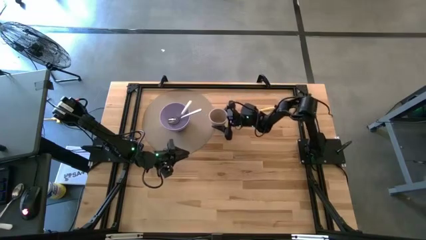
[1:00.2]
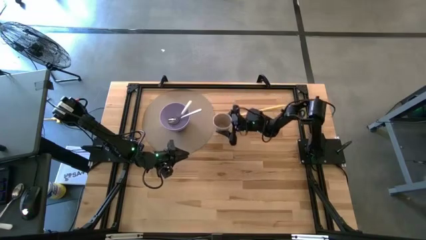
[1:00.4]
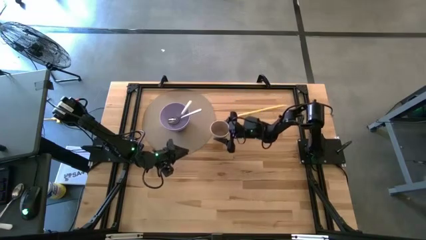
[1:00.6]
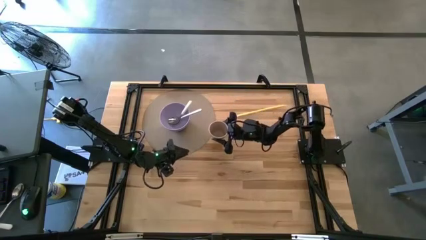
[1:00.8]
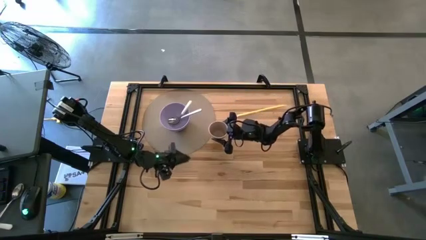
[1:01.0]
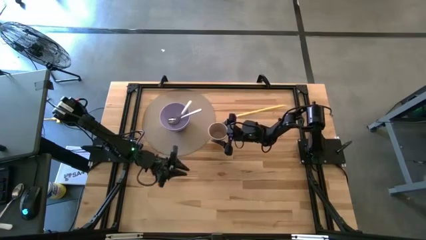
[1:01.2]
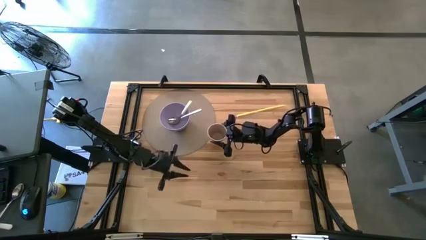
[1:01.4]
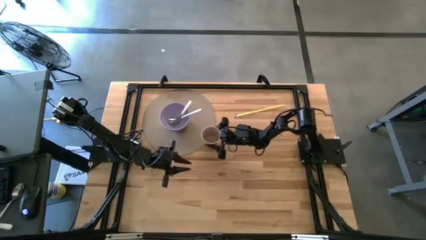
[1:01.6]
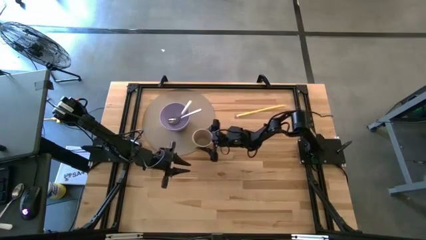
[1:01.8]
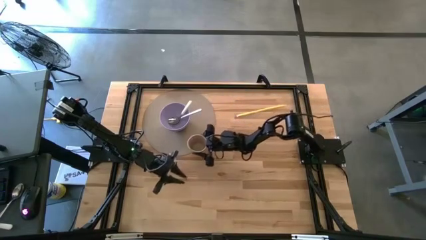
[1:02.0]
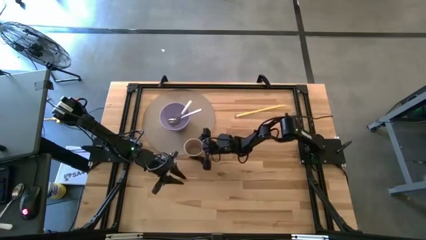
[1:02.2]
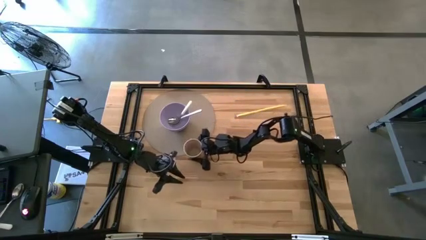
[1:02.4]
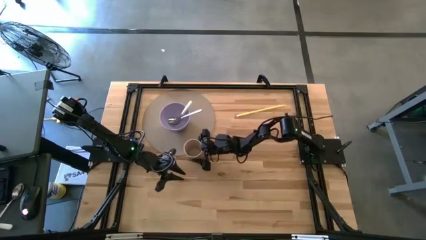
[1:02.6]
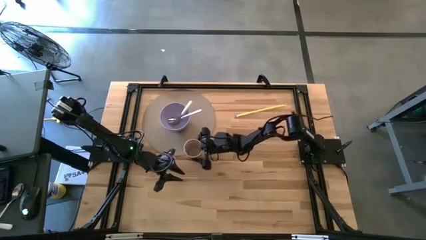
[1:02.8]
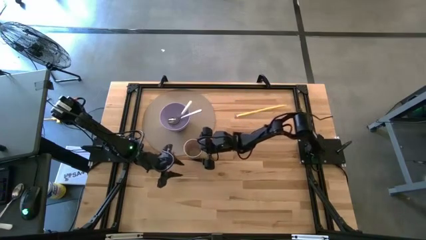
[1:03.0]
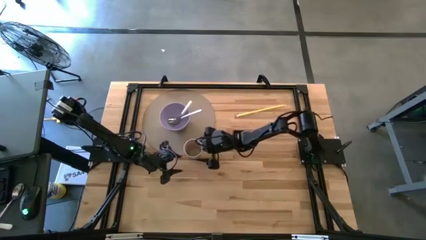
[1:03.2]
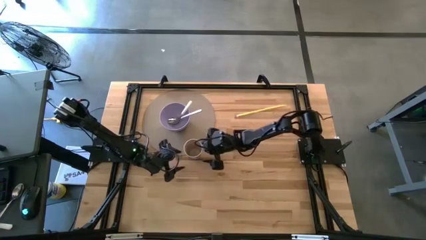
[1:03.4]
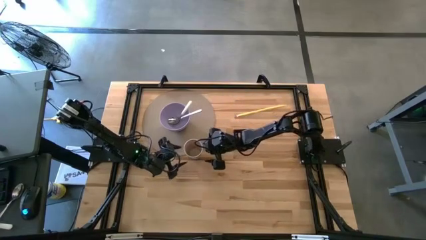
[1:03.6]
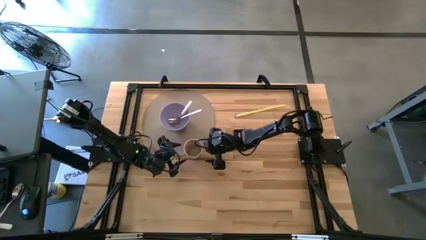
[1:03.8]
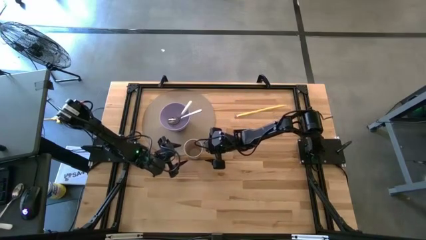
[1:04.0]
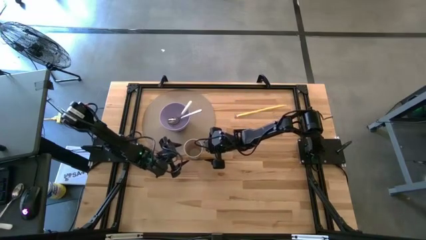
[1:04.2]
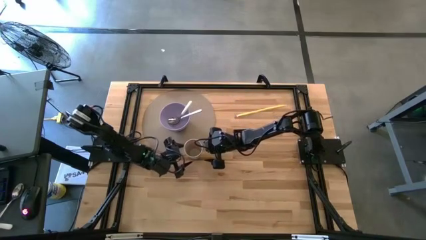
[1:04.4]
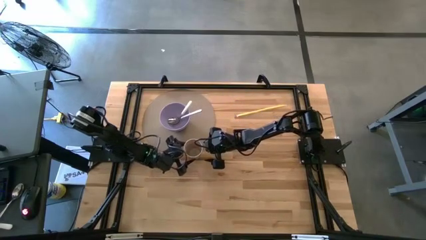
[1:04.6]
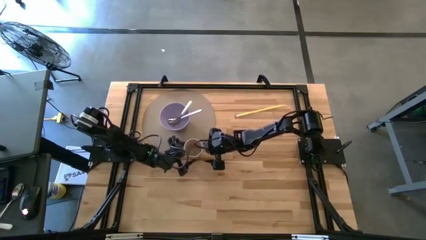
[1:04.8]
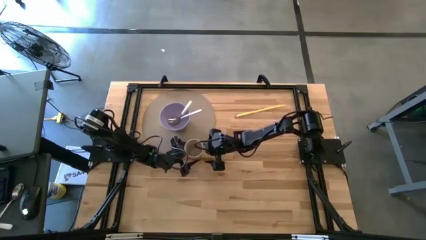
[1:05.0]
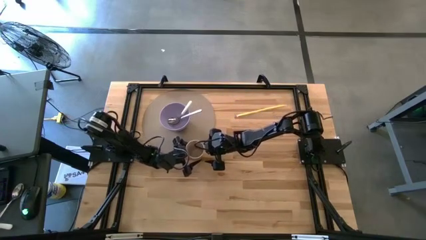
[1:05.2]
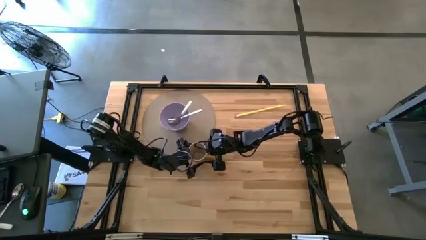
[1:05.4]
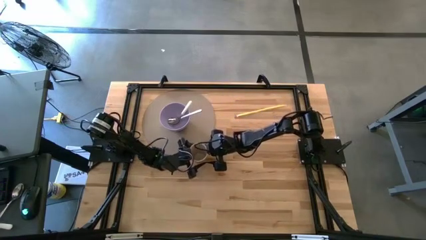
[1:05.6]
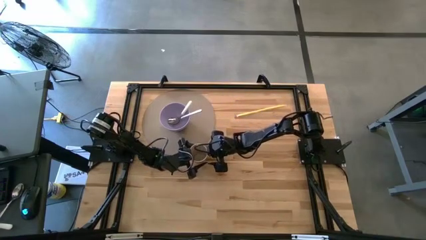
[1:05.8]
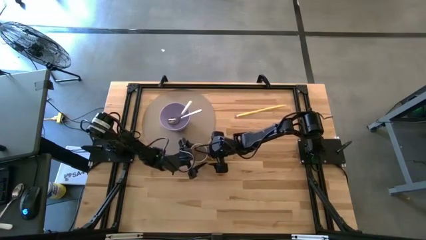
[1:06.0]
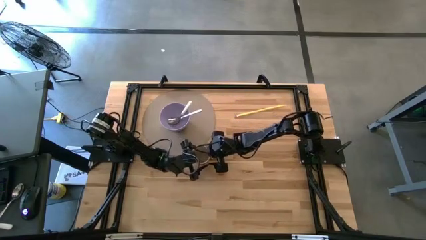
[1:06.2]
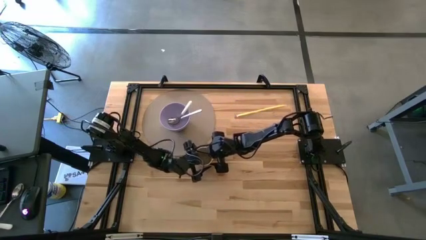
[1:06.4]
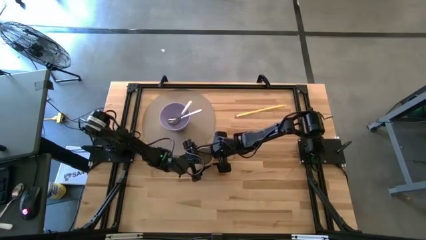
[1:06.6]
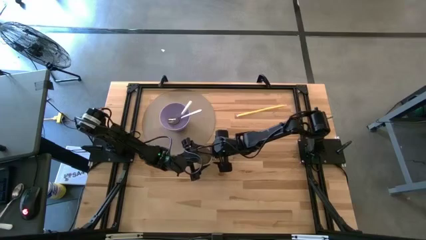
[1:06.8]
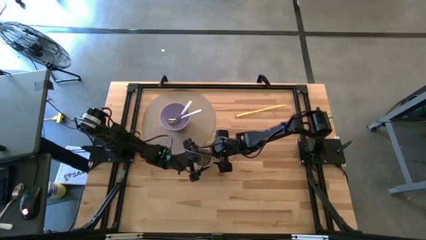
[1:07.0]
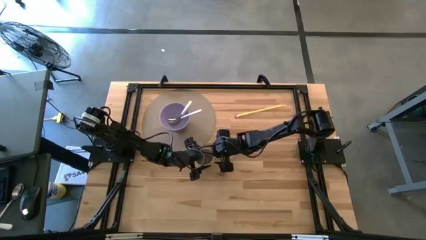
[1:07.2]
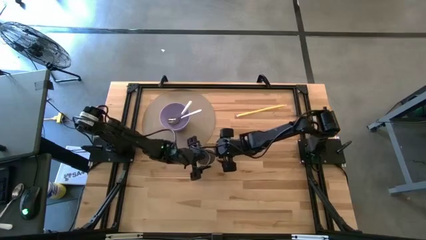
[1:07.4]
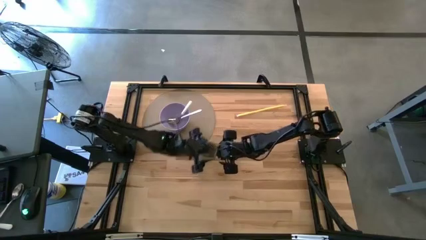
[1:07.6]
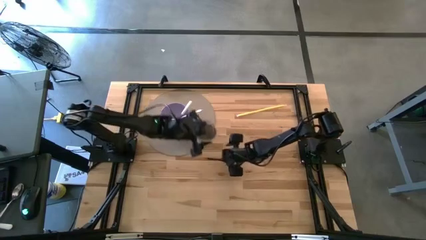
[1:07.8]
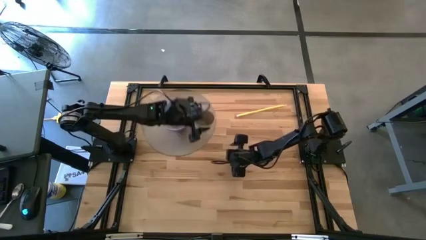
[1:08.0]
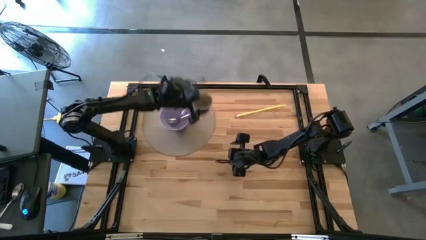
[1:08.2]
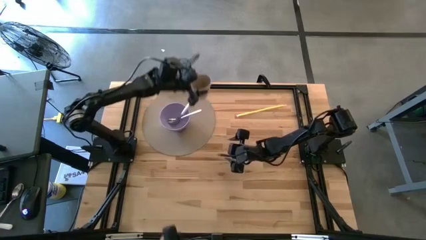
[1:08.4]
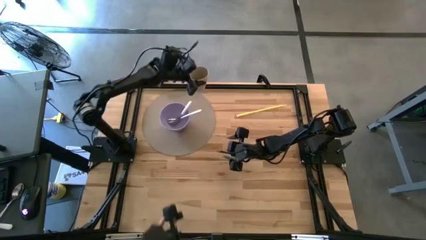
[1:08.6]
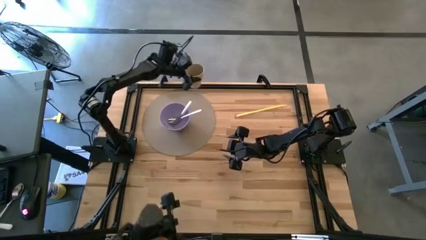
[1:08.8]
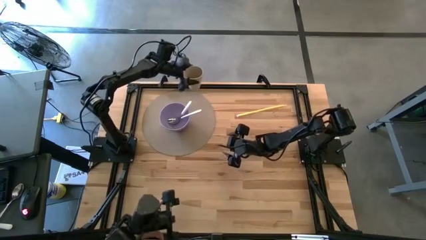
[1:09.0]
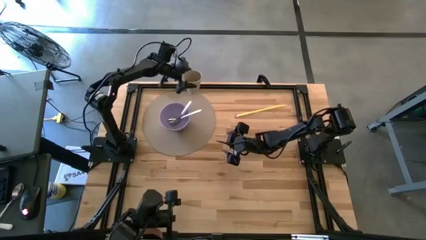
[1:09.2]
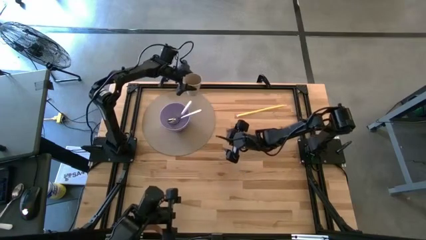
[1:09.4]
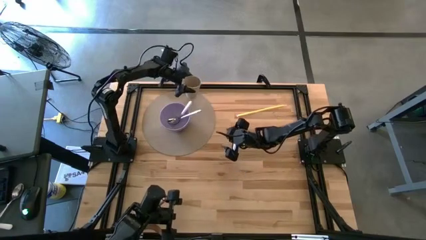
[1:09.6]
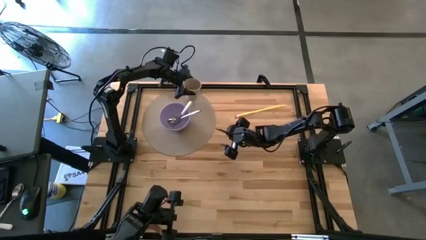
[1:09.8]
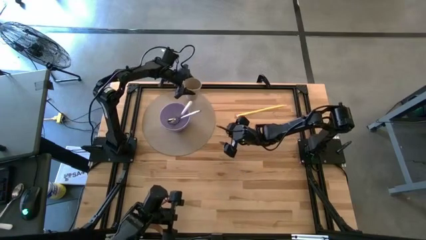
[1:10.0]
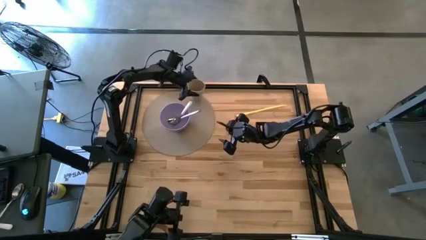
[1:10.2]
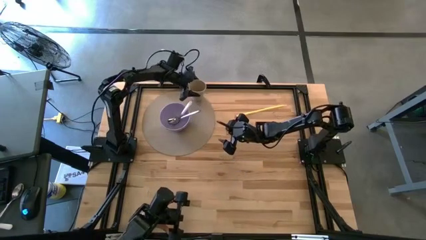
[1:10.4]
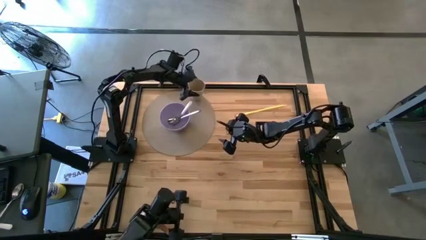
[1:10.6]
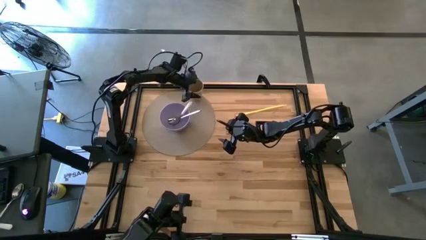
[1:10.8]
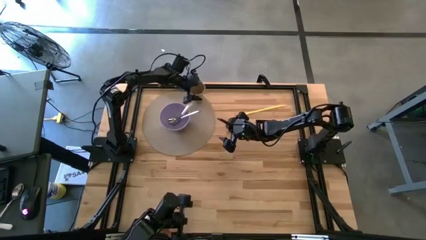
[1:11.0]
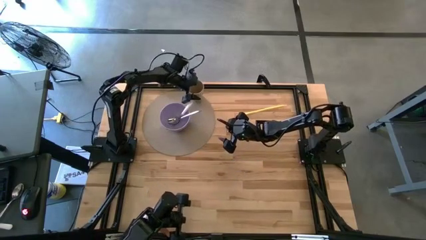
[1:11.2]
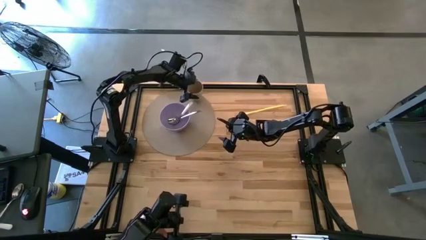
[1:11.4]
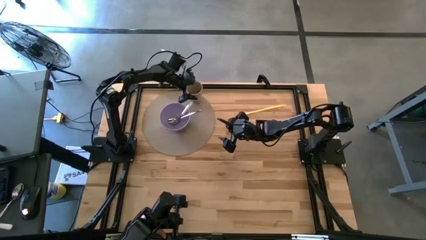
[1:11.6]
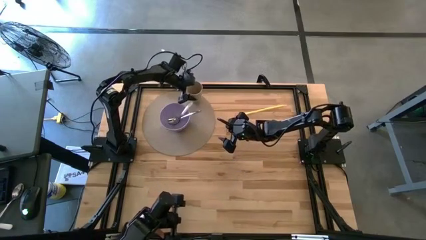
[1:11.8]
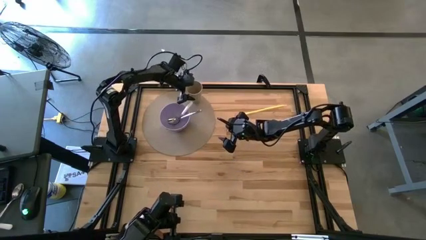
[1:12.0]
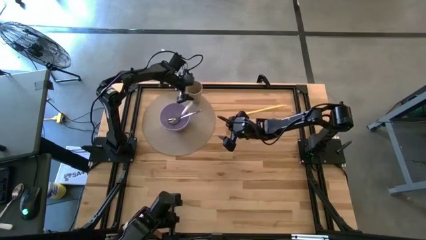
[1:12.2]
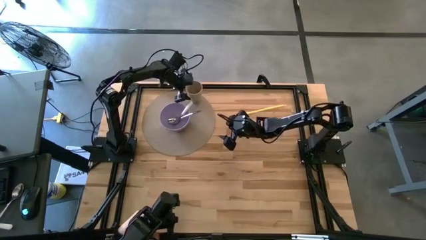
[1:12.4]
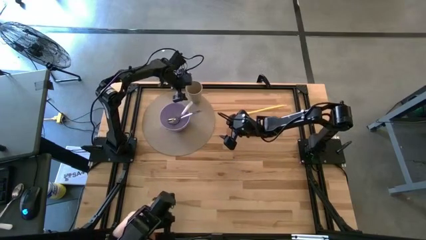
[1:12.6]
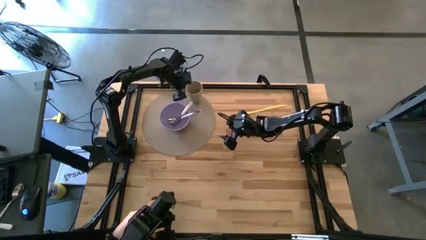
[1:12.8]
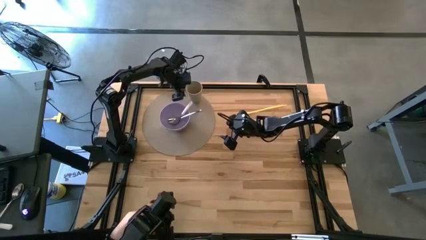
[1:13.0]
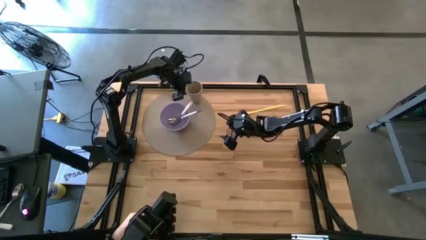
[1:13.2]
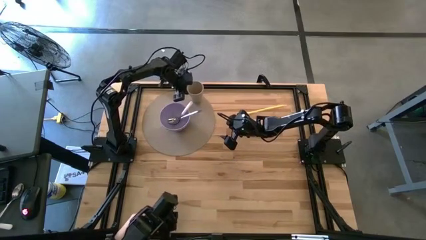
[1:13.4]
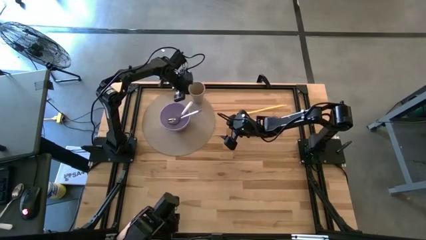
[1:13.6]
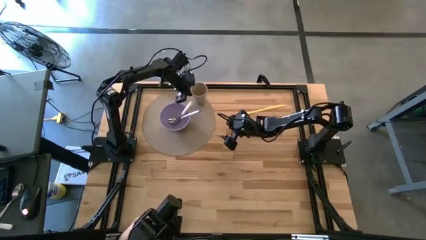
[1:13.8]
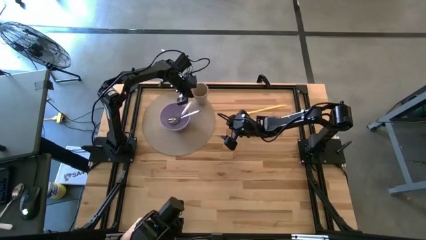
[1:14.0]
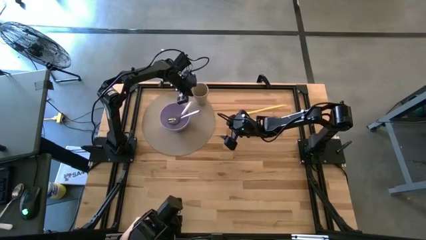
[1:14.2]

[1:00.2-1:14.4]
Task: Pick & Place Utensil
Put the white cup on the brown mat to the top right of the violet bowl

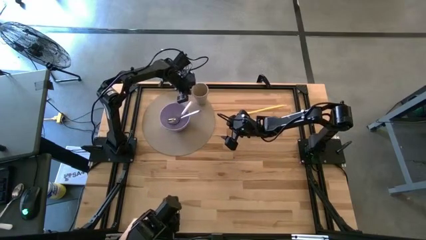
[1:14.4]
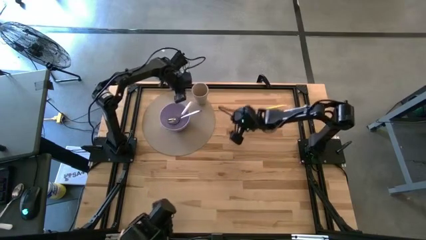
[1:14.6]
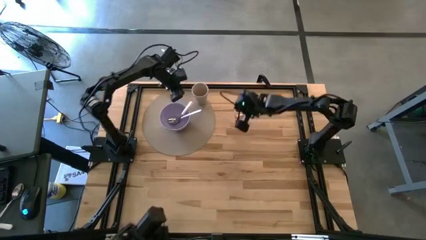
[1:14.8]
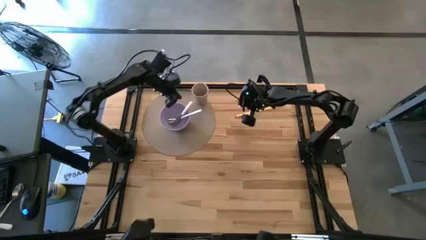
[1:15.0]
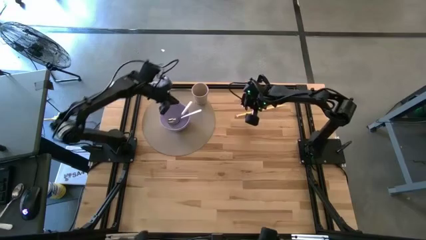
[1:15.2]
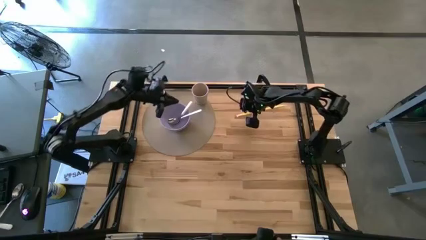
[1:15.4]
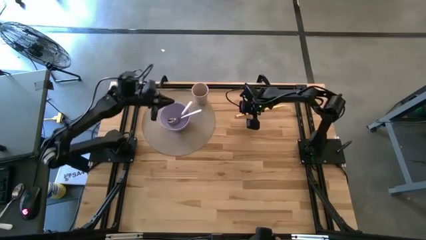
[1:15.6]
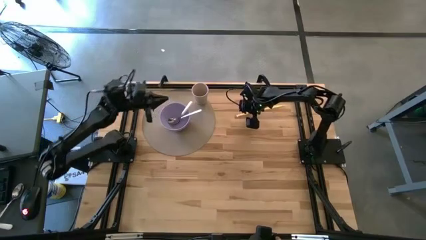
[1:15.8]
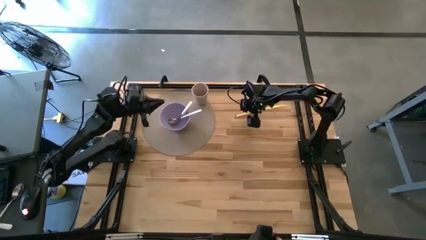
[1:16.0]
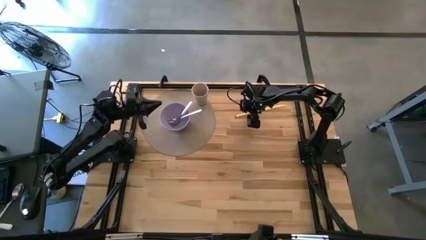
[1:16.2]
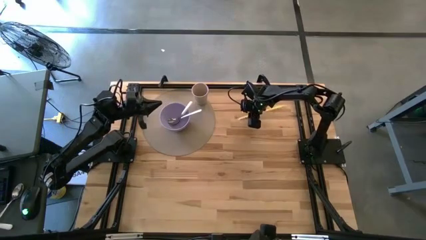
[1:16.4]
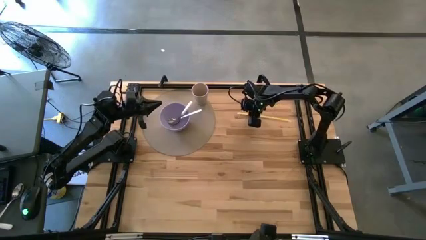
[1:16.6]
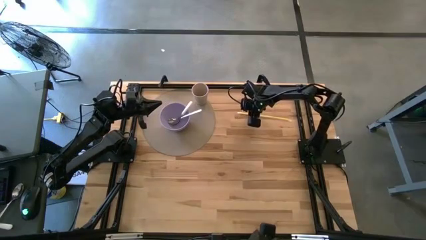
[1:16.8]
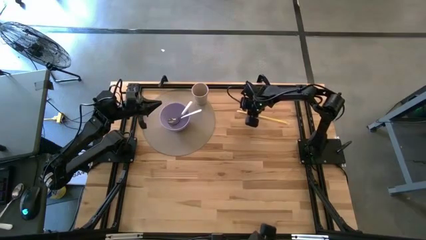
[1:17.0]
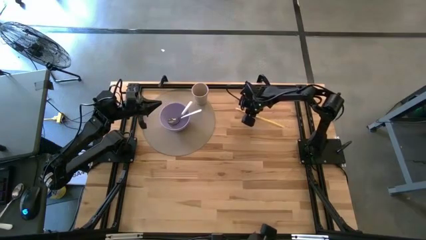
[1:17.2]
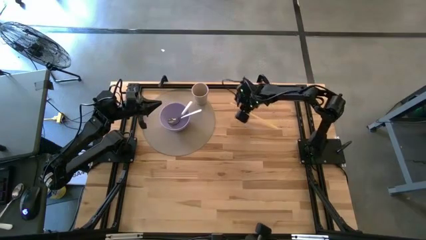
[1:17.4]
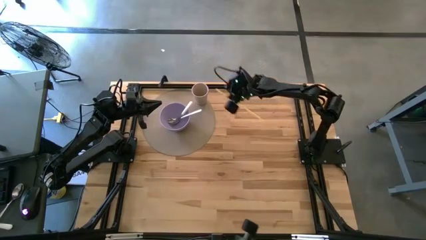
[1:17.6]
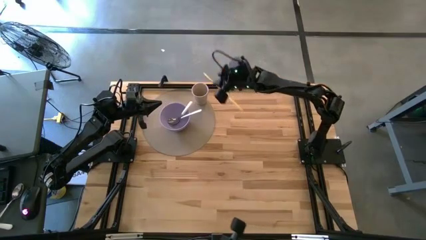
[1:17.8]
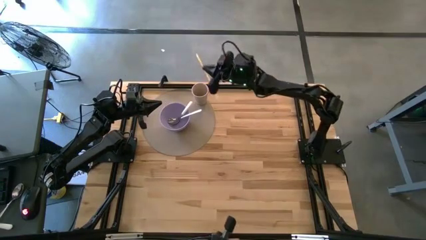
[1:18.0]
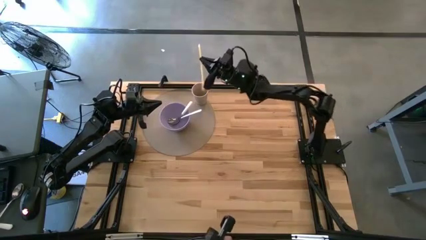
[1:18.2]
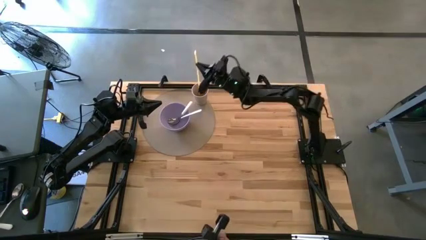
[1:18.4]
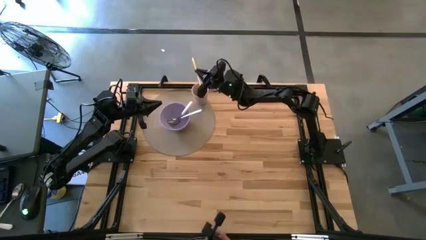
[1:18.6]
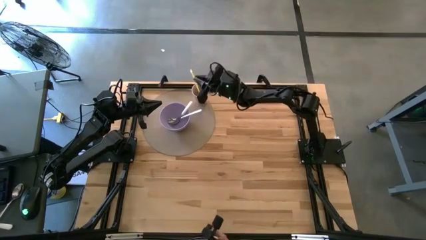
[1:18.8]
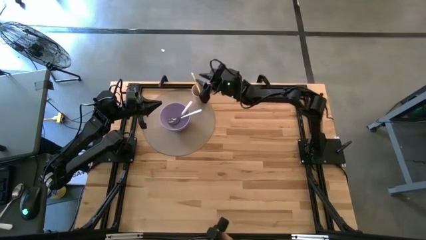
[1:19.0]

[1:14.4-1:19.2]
Put the yellow straw into the white cup to the top right of the violet bowl
